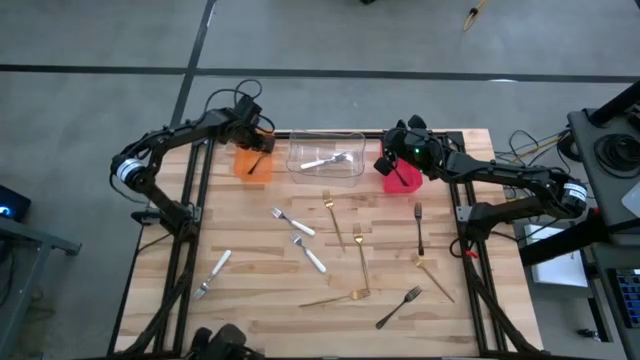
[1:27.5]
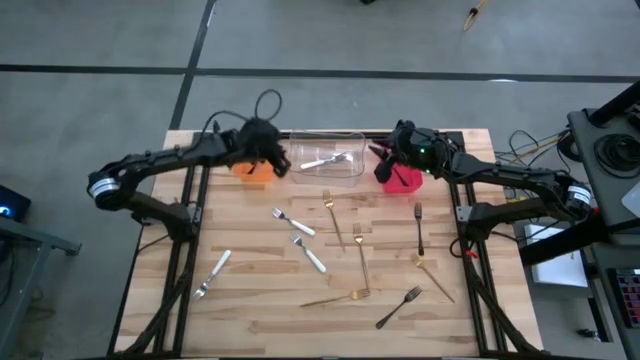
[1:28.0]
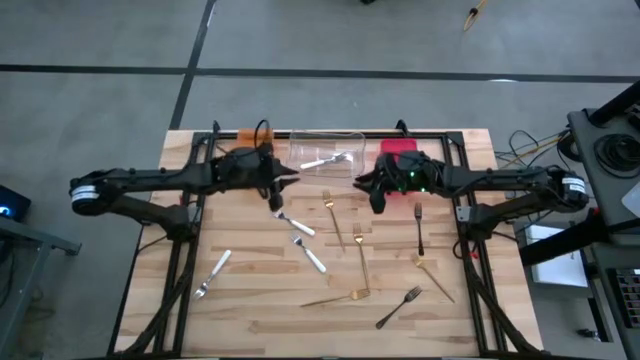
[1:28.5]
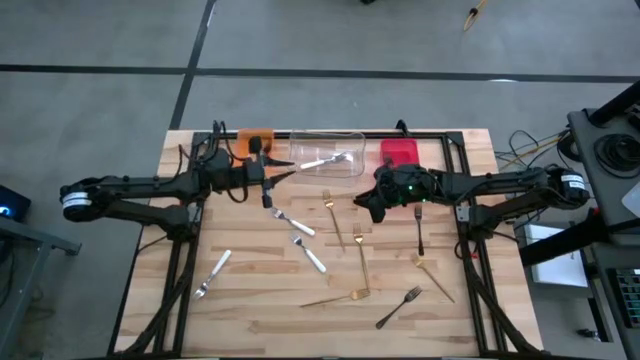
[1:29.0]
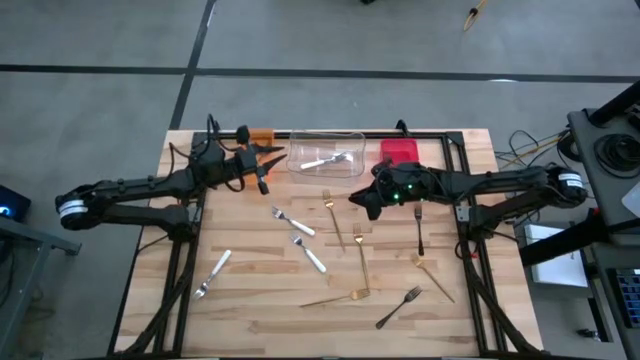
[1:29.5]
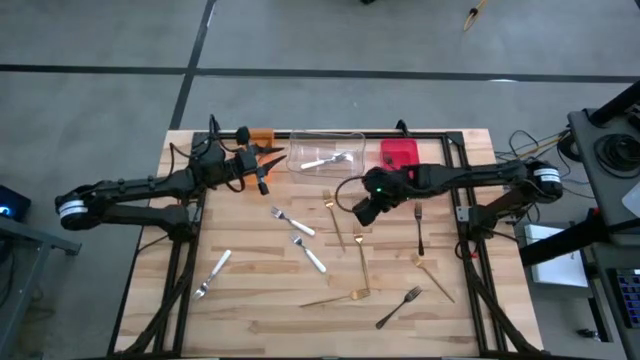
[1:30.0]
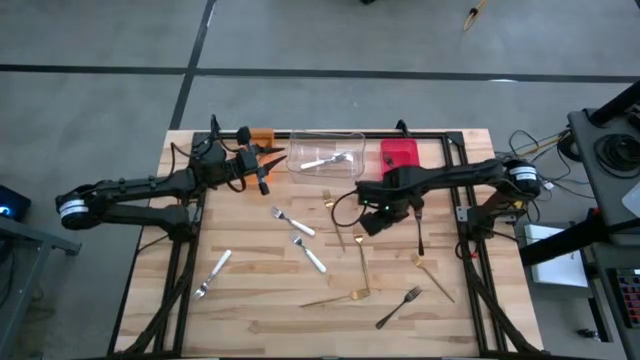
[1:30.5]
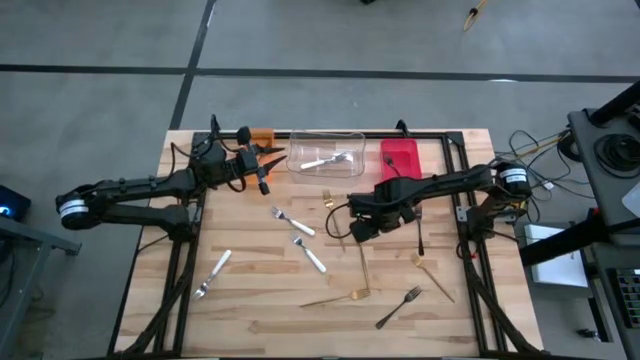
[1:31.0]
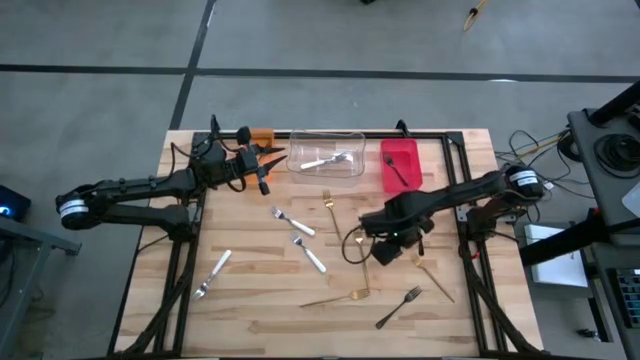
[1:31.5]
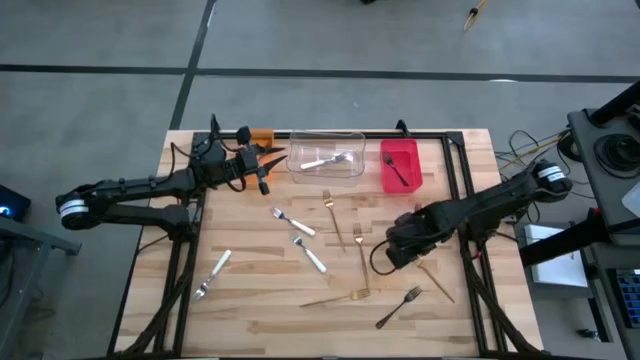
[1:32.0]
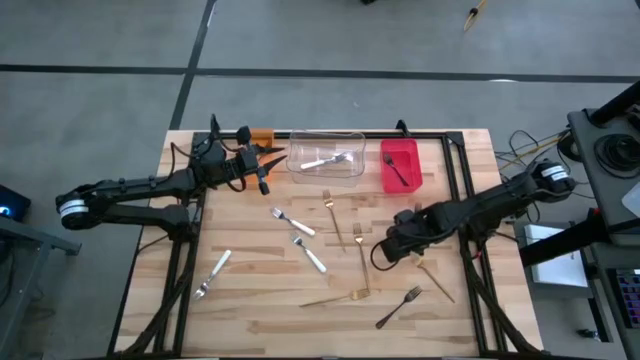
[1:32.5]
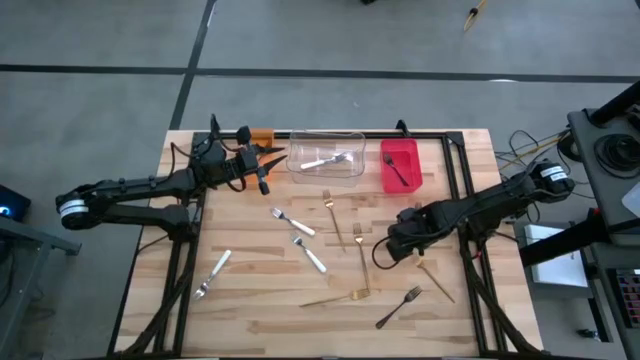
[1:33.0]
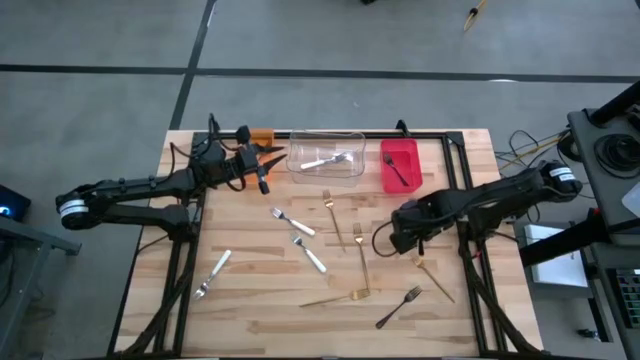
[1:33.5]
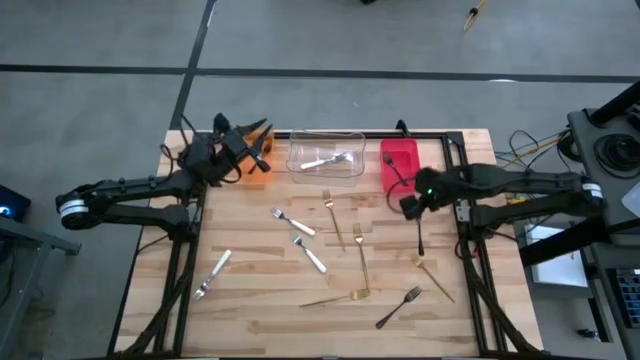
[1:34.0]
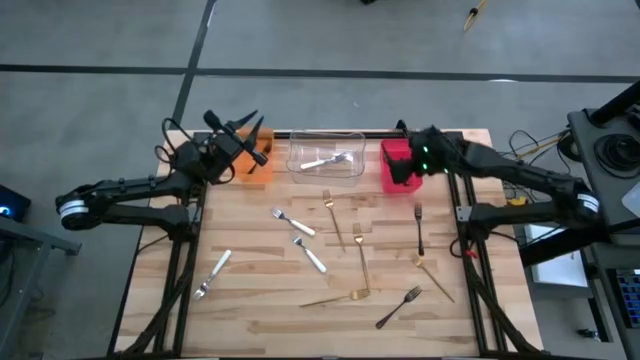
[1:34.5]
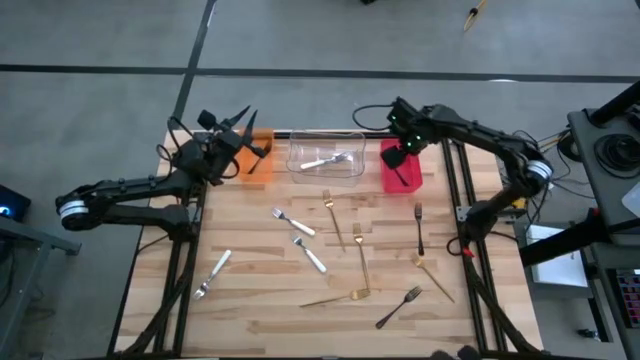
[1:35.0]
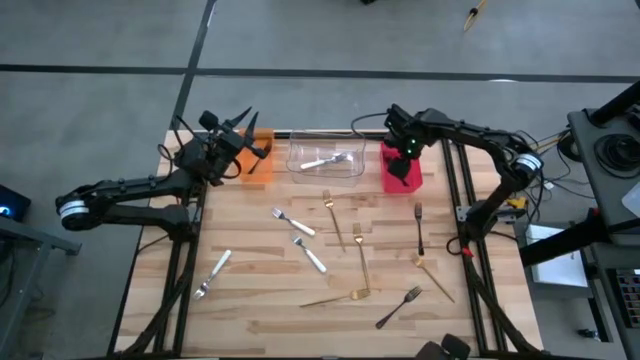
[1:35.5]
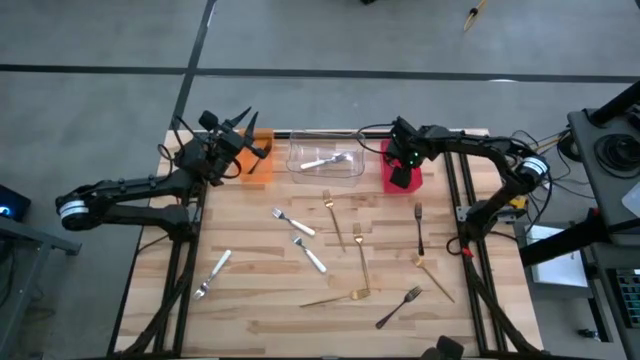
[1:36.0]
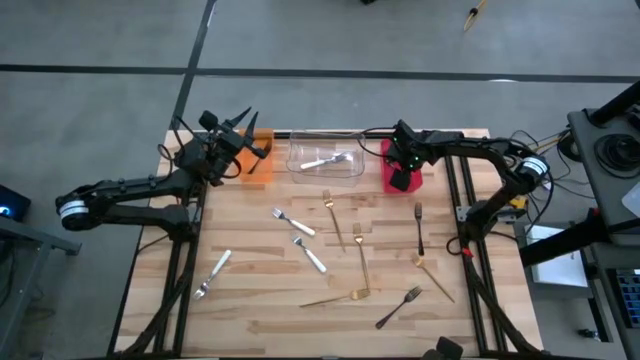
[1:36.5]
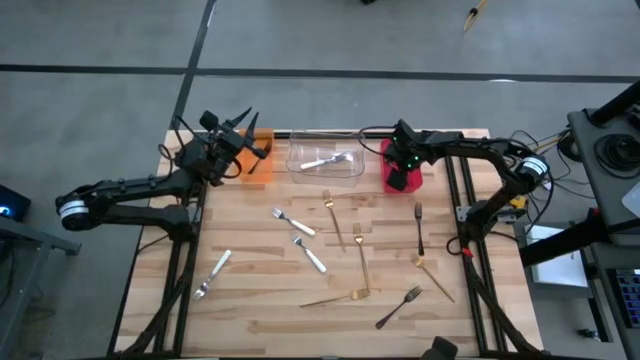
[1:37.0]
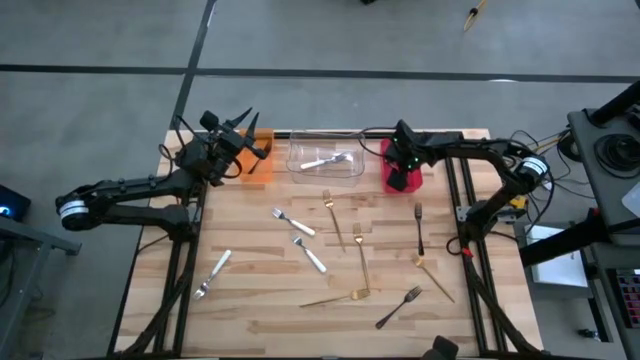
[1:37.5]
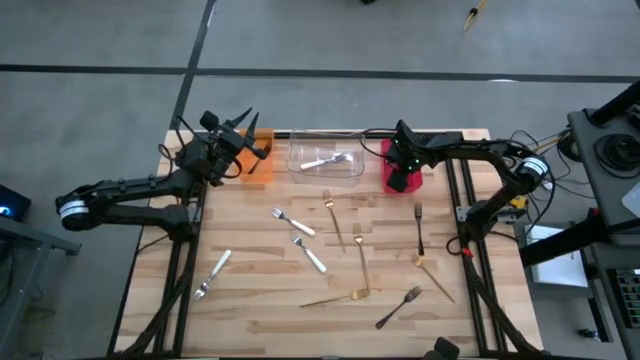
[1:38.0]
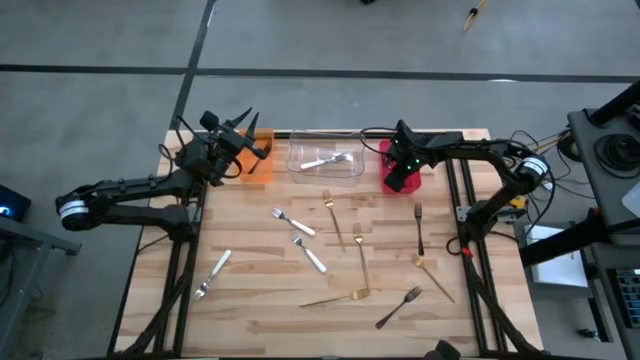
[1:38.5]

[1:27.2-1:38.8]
Task: Sort silverware by color (type)
Put the black fork into the orange bin

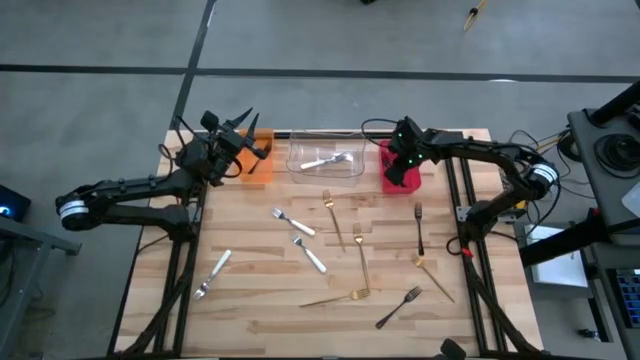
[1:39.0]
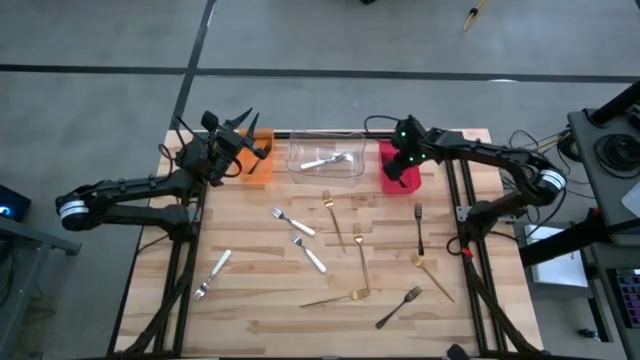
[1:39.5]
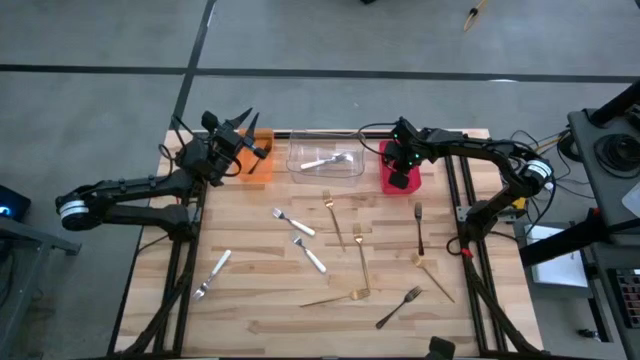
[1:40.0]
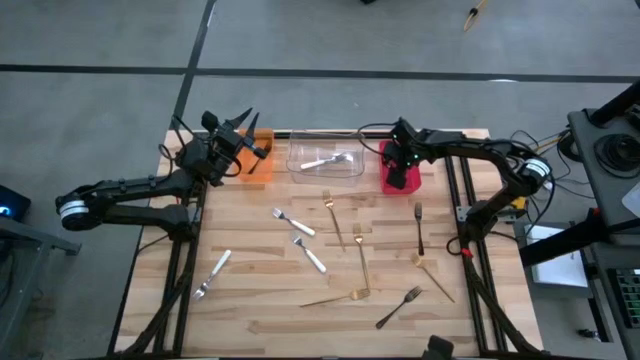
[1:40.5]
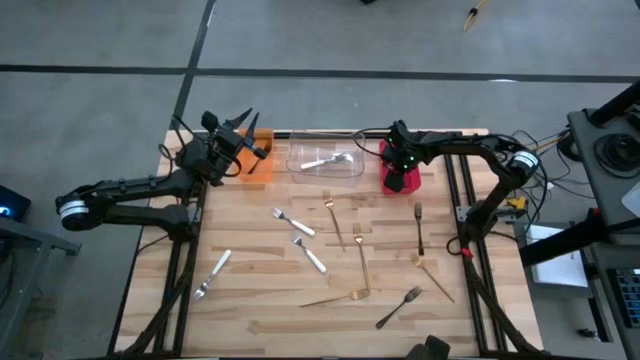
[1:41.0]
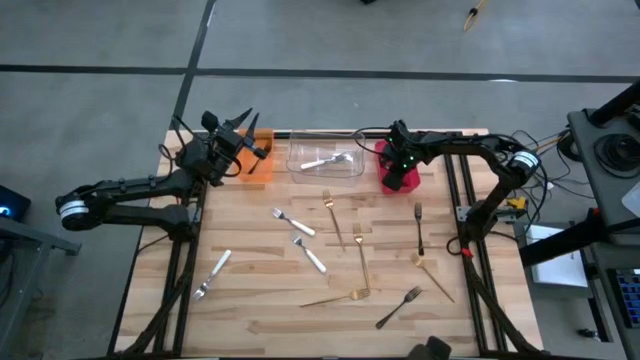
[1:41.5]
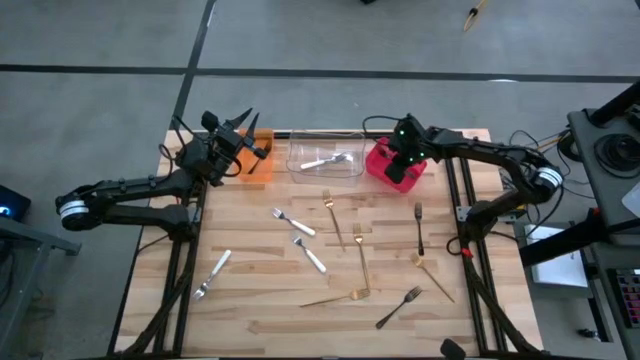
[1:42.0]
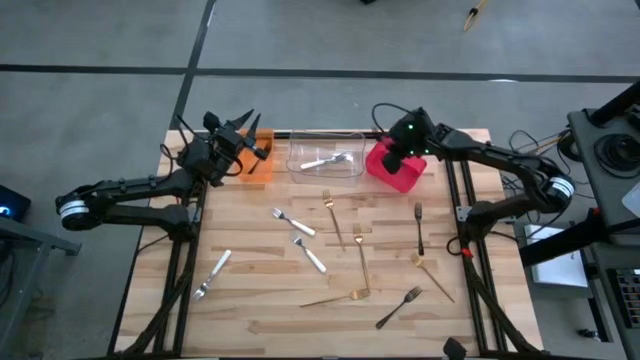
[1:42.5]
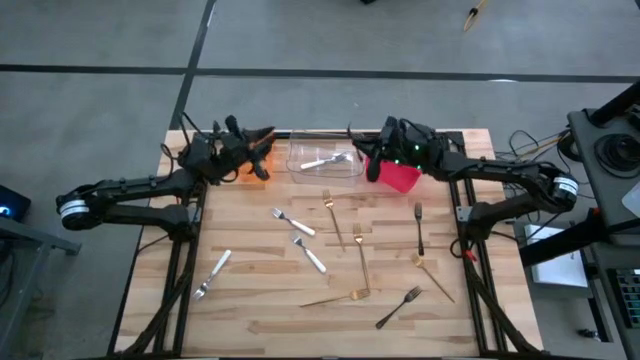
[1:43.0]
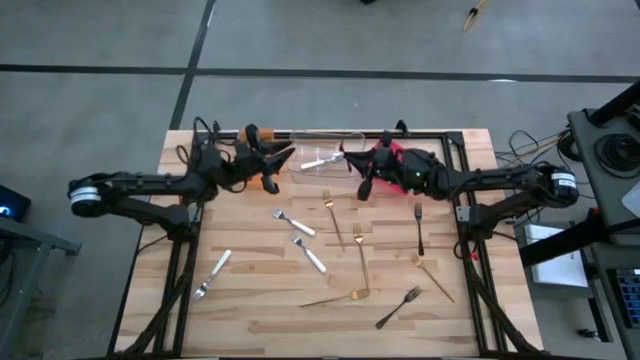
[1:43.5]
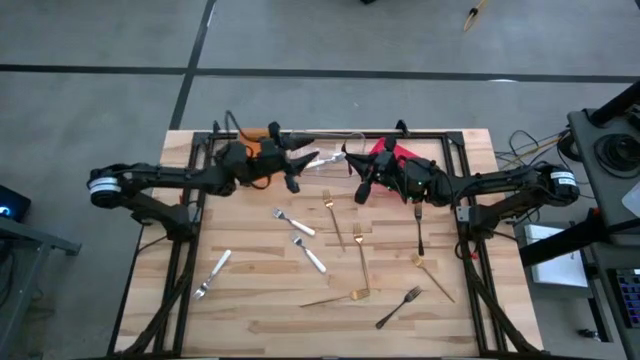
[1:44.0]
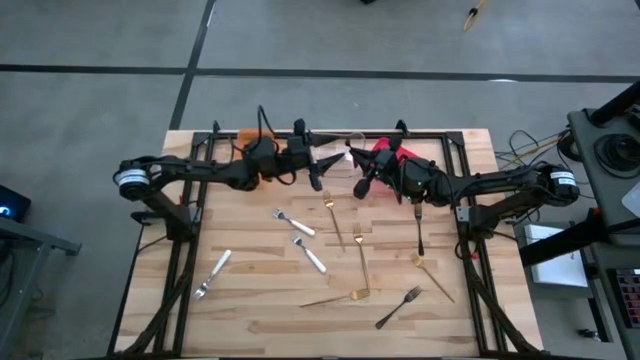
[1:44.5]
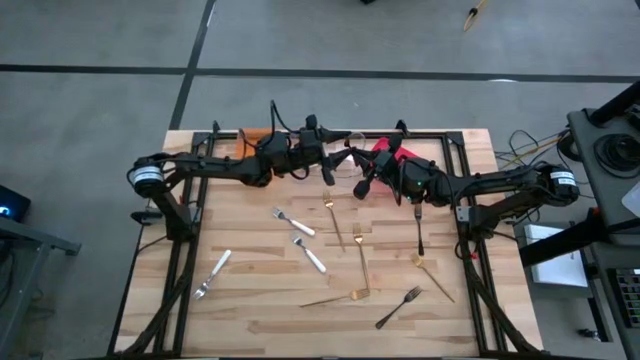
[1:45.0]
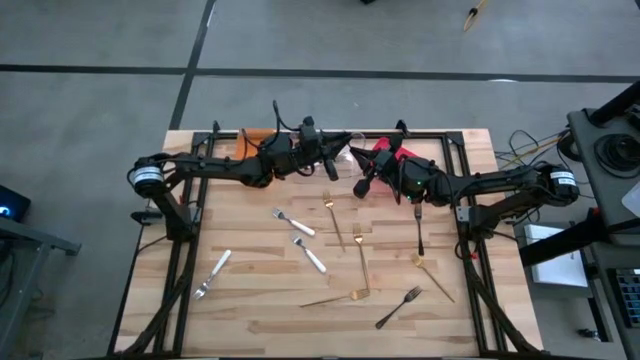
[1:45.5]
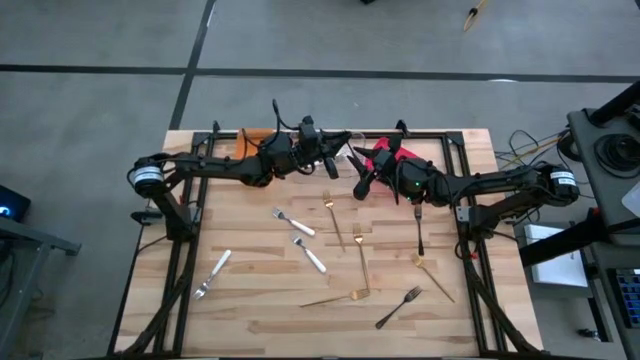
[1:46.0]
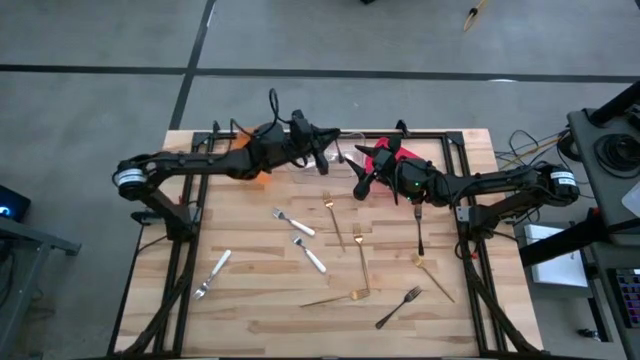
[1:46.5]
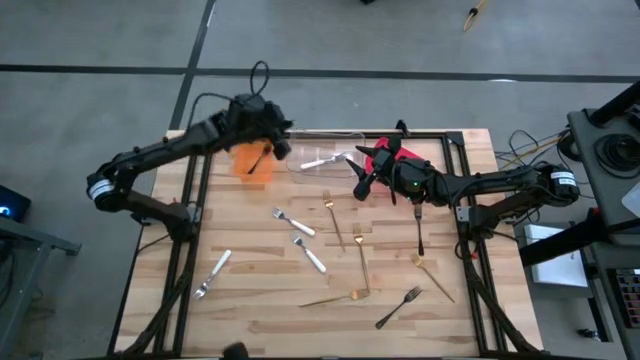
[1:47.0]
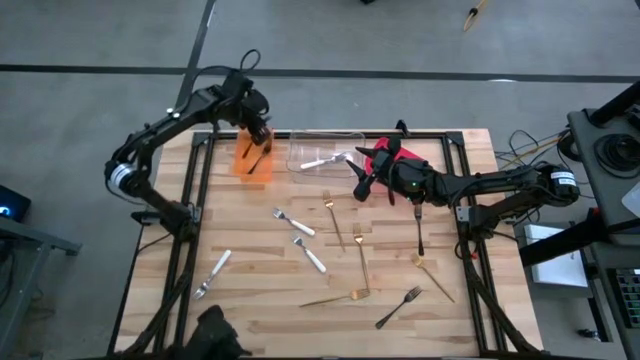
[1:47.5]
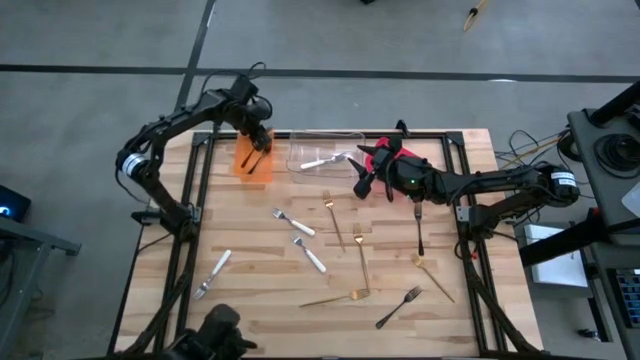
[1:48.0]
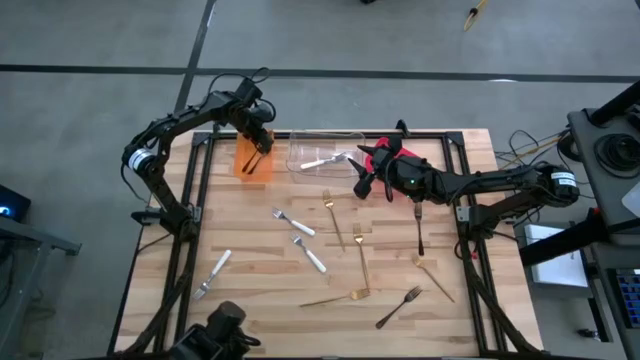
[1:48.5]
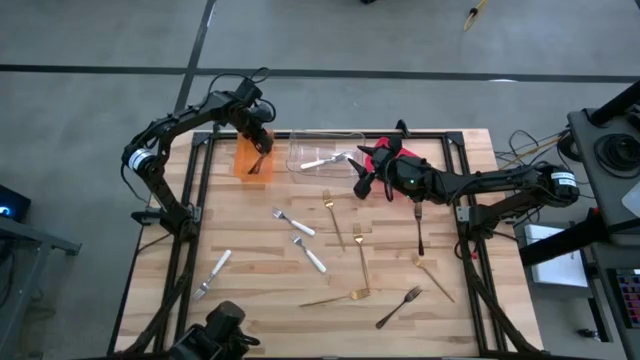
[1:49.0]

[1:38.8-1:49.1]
Put the black fork into the orange bin
